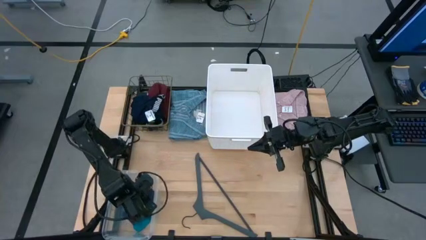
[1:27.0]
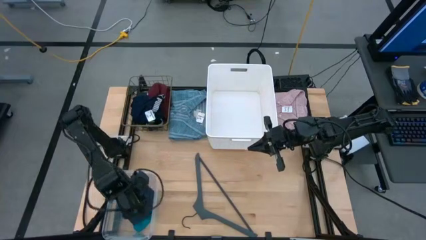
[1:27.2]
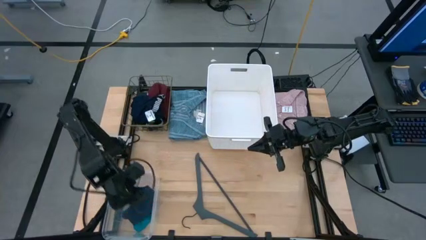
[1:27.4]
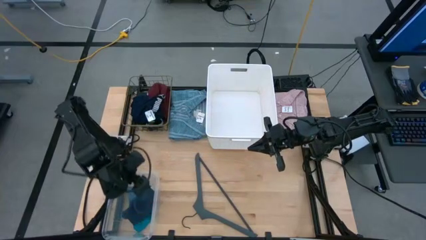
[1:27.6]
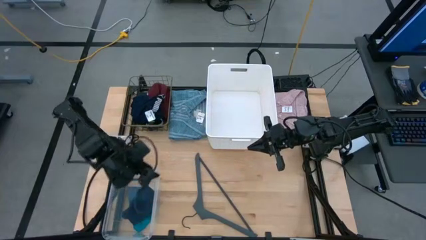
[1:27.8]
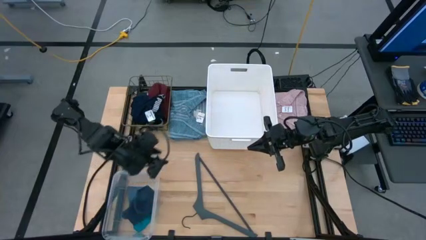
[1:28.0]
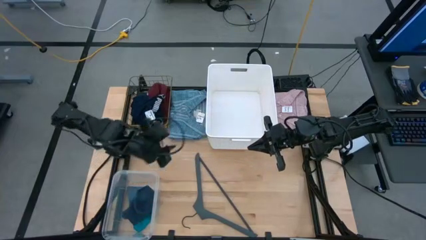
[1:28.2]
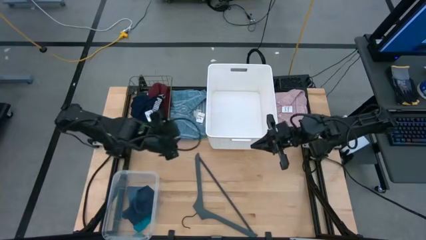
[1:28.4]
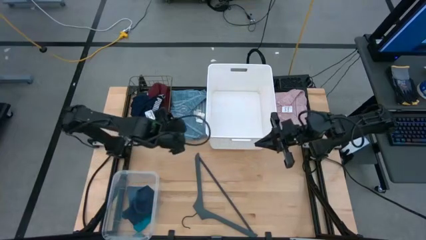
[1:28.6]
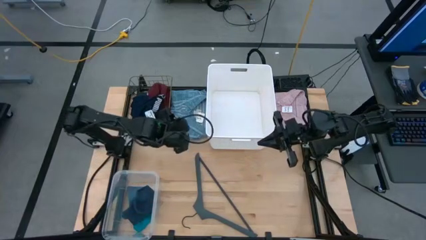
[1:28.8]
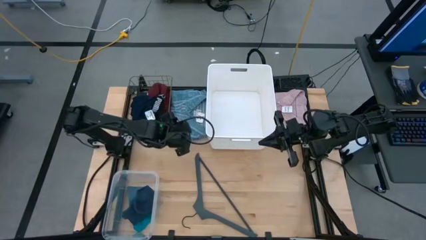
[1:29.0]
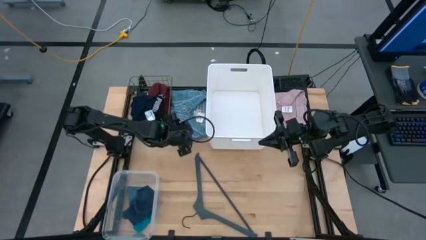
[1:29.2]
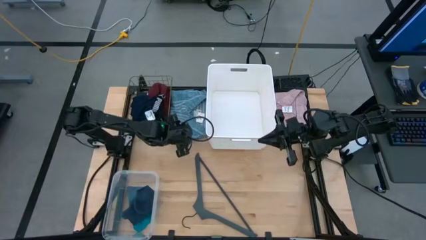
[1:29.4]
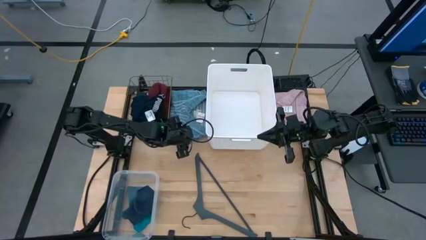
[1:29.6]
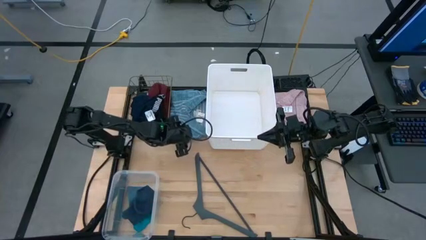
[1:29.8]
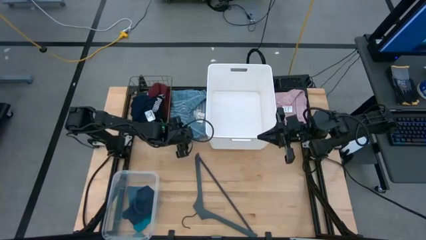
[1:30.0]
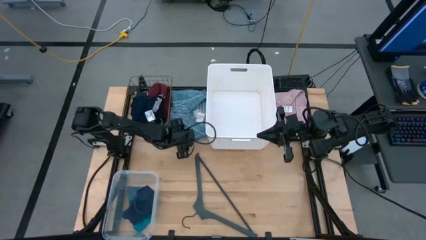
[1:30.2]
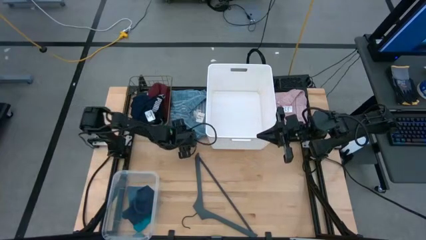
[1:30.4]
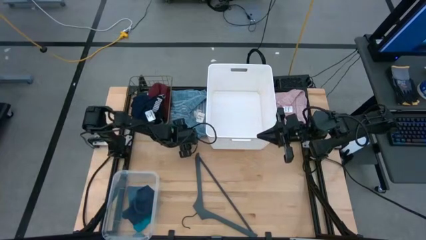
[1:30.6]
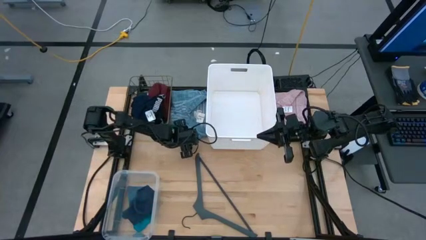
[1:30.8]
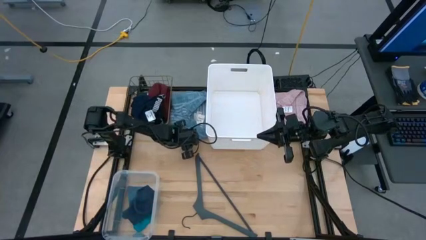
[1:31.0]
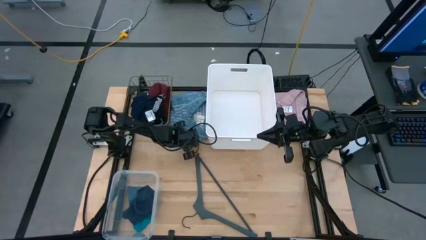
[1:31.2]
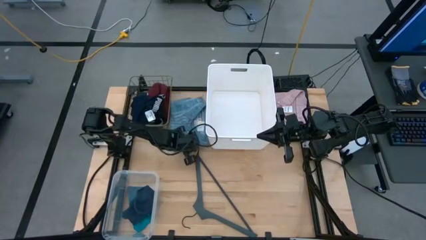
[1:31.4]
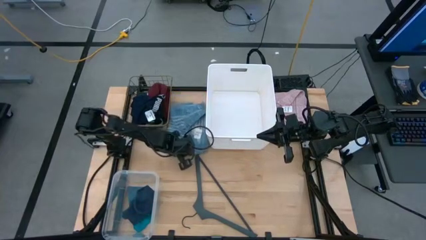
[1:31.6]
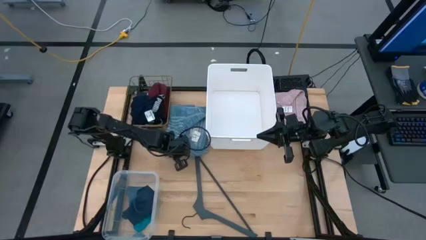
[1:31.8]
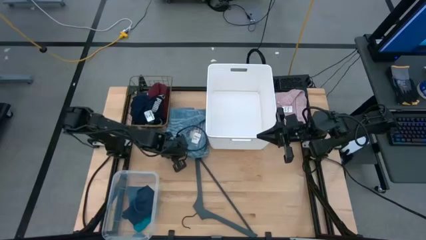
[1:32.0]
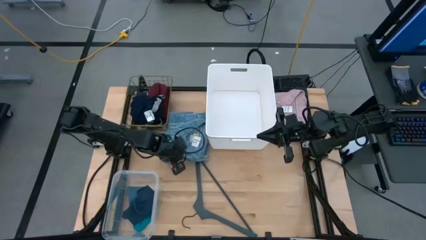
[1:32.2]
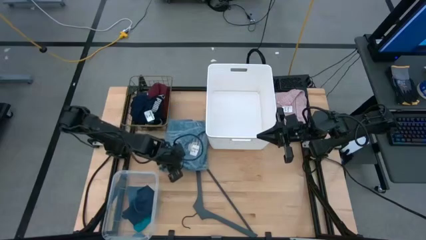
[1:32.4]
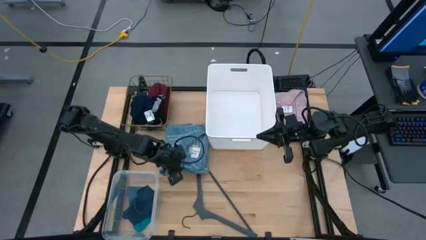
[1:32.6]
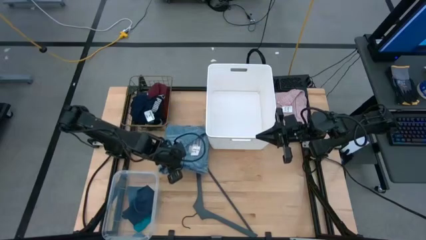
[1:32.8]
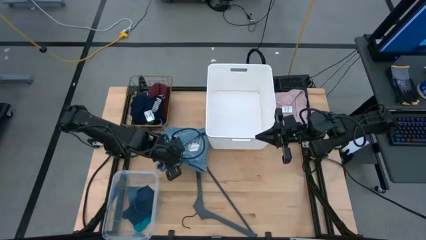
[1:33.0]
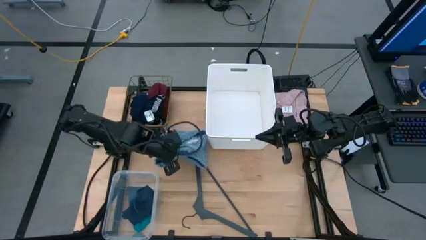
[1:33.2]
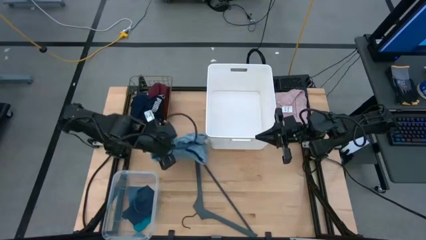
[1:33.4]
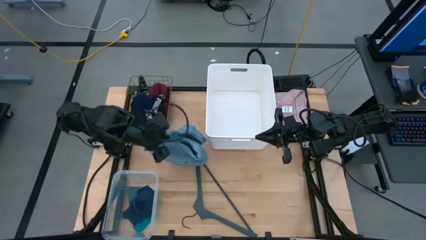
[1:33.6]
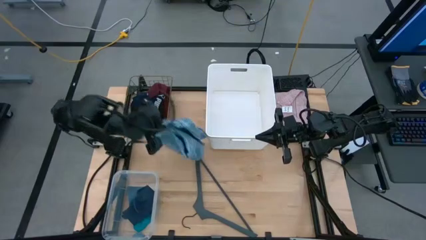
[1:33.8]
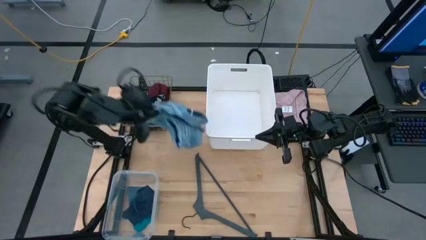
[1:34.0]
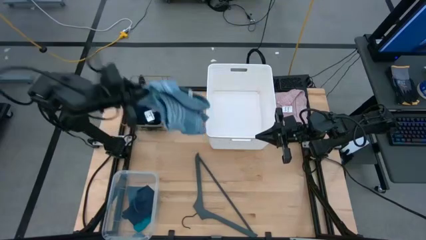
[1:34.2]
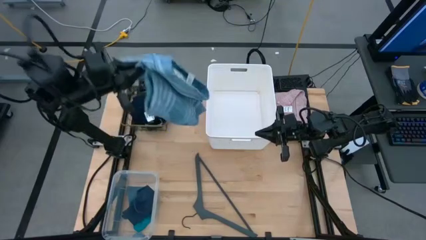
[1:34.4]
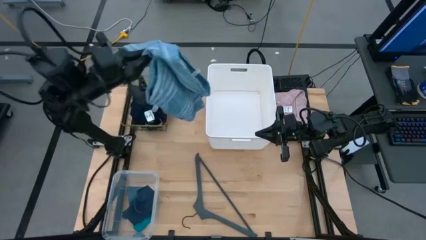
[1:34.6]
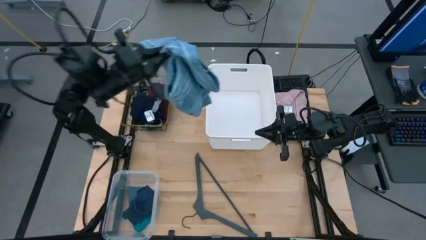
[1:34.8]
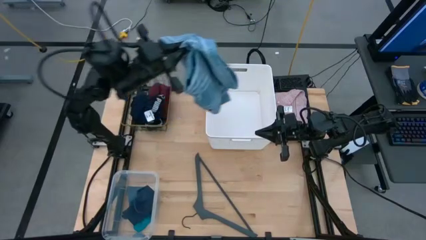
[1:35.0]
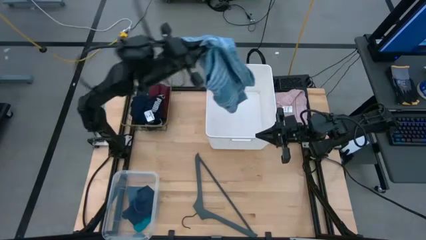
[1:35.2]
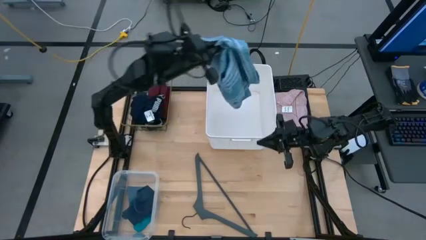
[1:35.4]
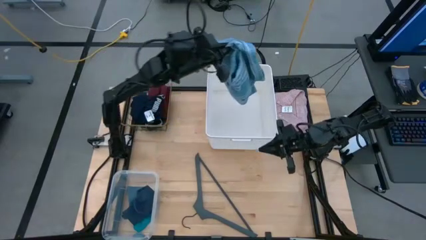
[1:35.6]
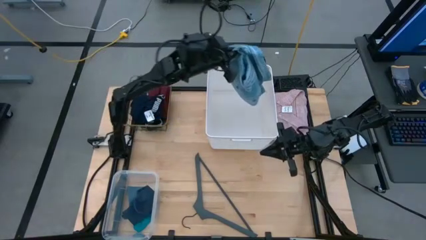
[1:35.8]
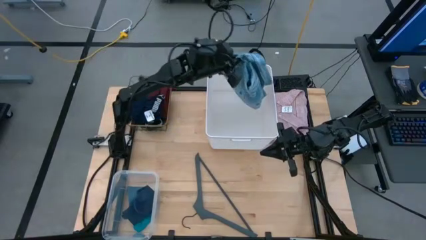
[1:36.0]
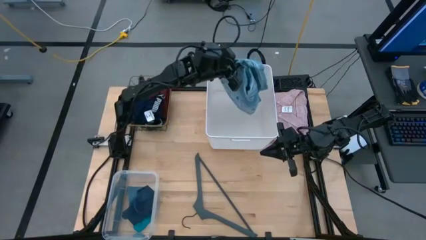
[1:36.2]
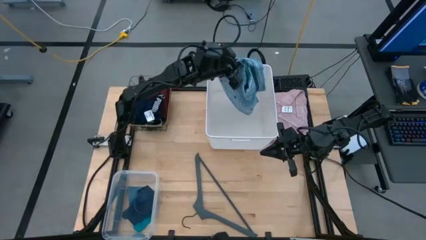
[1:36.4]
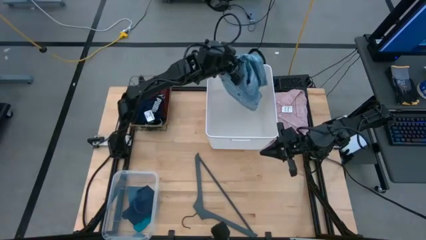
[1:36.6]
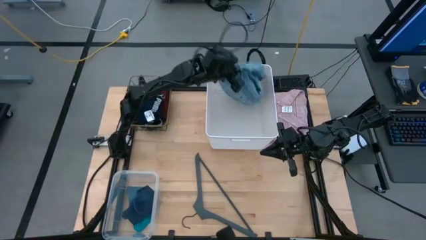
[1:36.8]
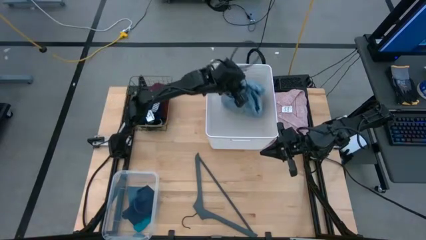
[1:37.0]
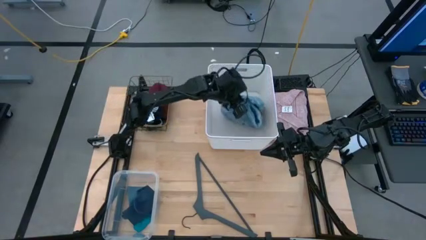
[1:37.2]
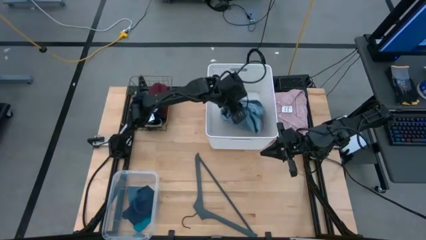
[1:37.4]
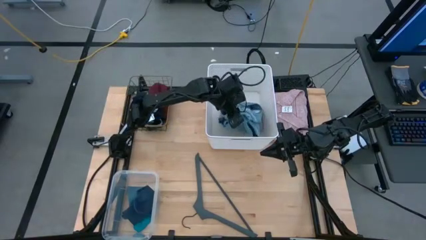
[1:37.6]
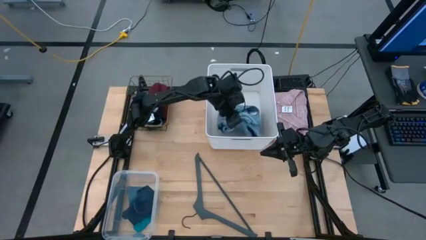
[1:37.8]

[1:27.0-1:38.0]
Task: Pick & Place Cloths
Put the blue polo shirt into the white laundry bin

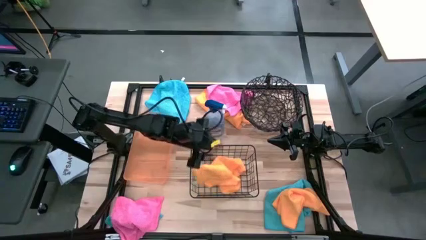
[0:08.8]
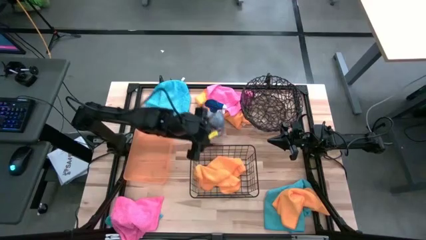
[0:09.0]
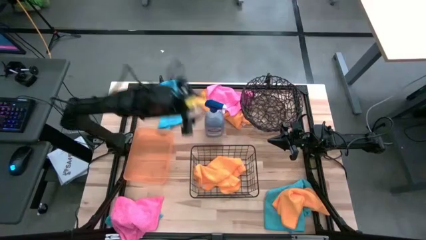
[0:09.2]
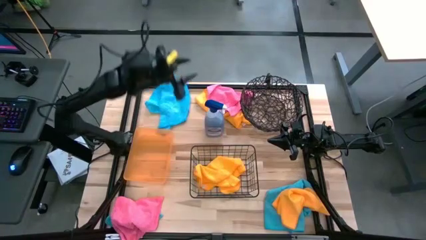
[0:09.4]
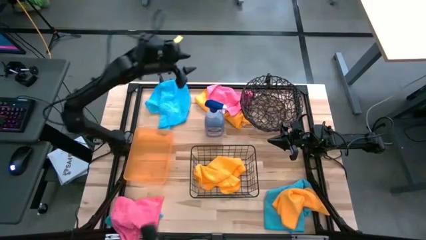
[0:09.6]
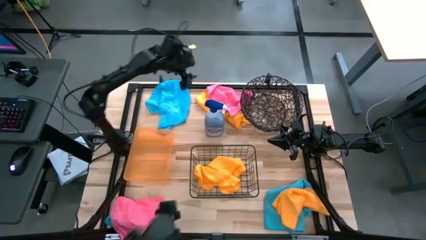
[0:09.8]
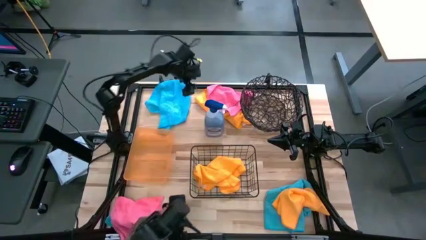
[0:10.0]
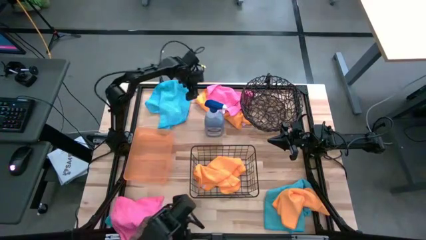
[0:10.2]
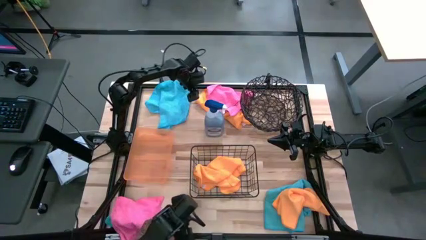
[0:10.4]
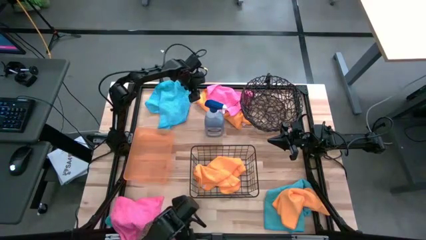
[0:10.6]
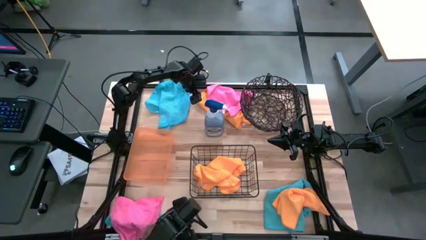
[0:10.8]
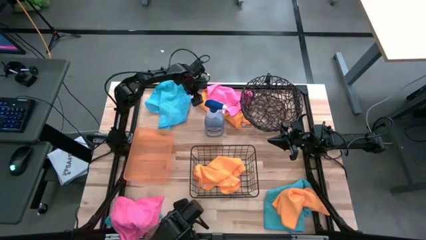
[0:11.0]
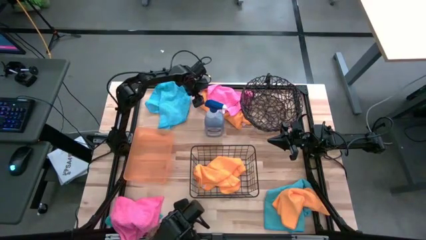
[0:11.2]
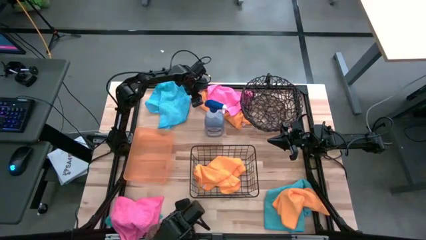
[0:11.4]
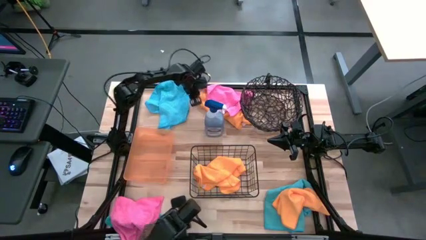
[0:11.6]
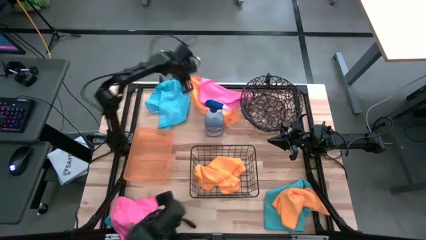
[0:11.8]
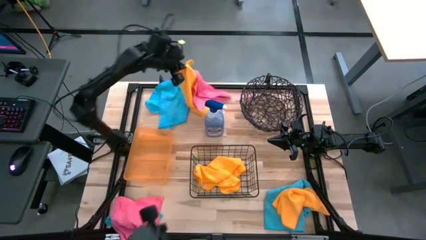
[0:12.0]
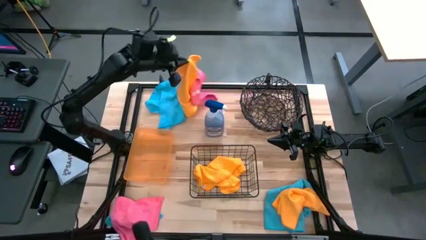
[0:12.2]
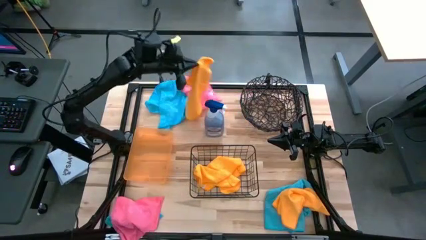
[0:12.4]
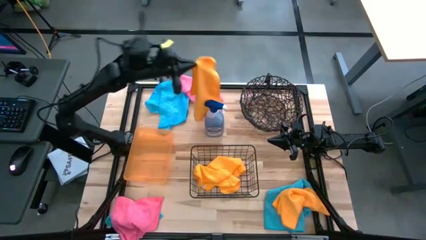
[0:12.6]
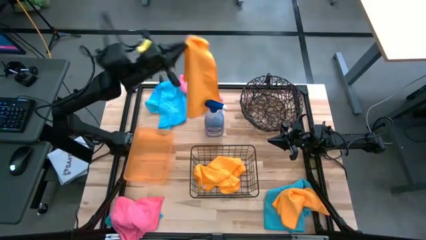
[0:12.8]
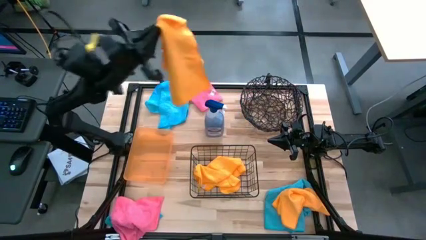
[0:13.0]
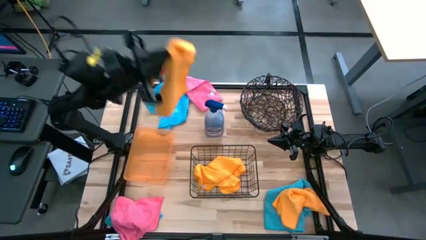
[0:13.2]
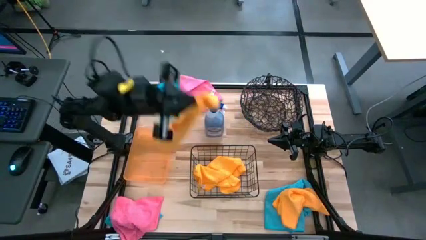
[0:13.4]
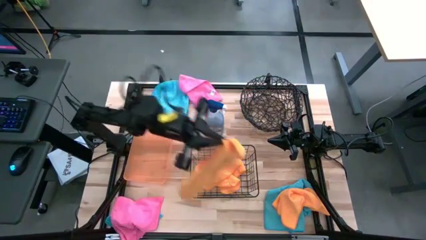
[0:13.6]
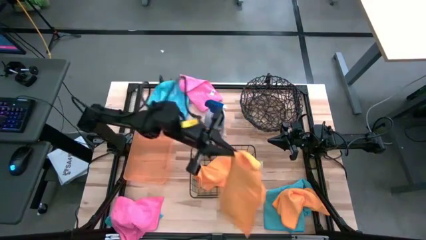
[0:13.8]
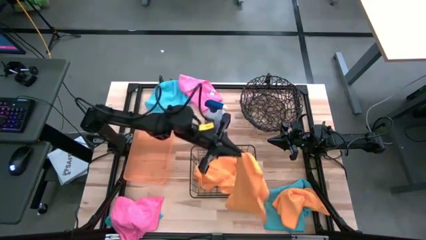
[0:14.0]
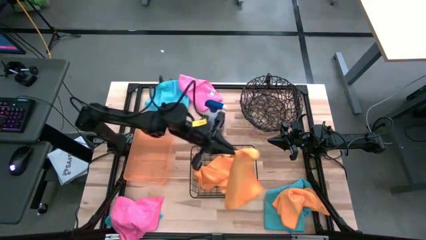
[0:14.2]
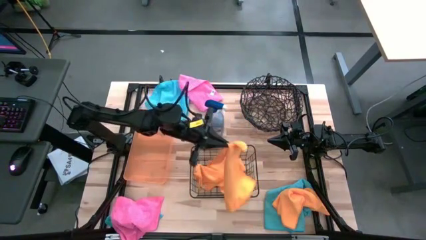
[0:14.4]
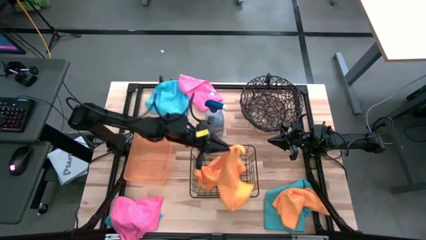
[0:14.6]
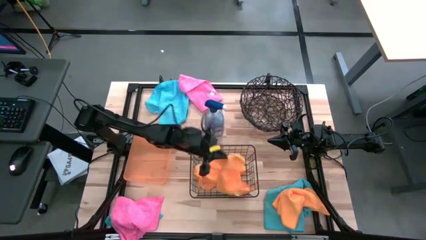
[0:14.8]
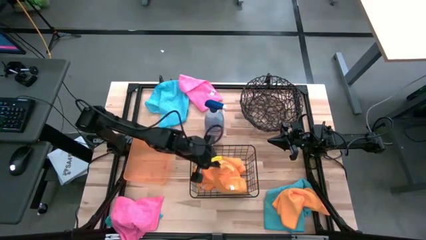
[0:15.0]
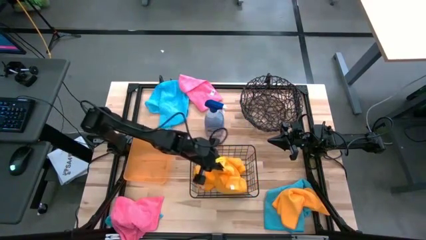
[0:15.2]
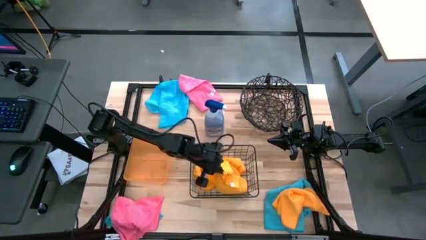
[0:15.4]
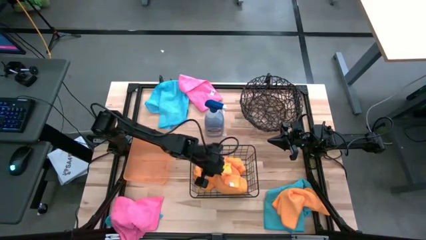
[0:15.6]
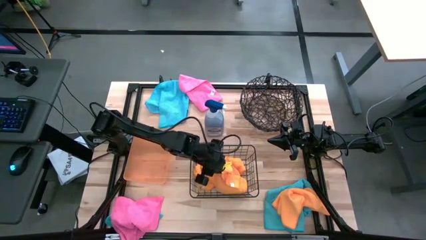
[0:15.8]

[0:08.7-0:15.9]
Task: Sort microfiber towel by color & place in baskets
Put the top yellow microfiber towel into the wire basket
